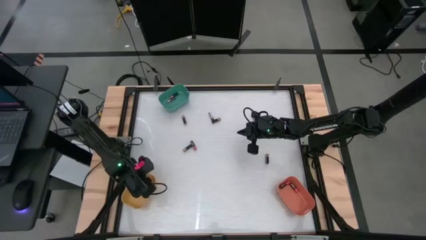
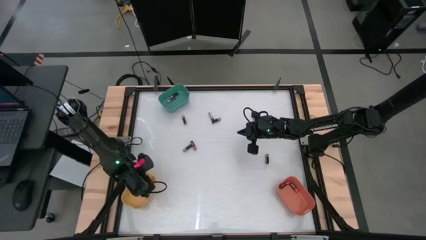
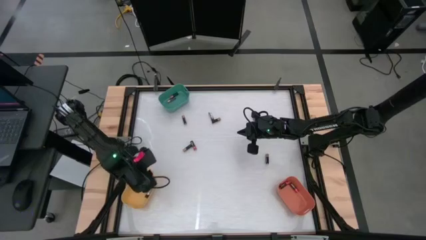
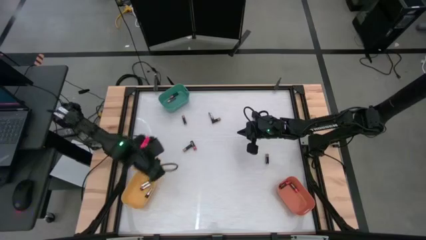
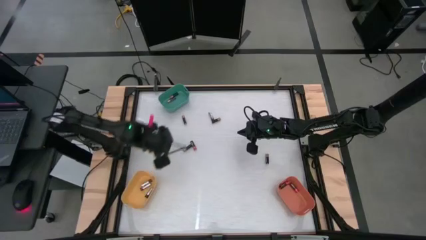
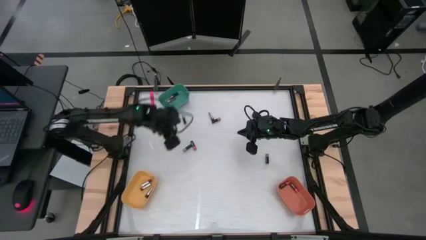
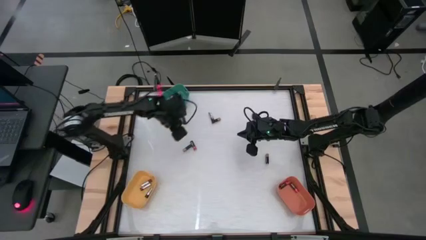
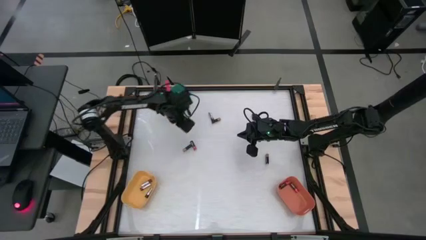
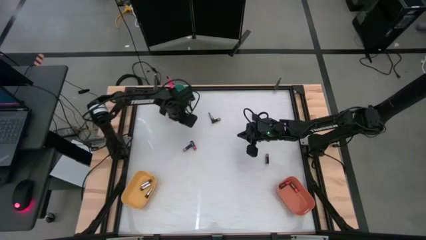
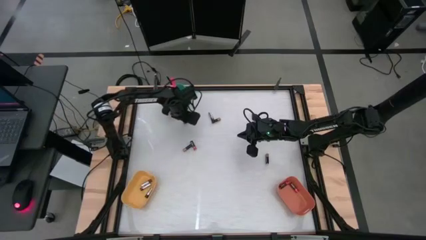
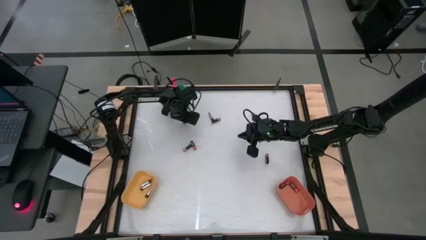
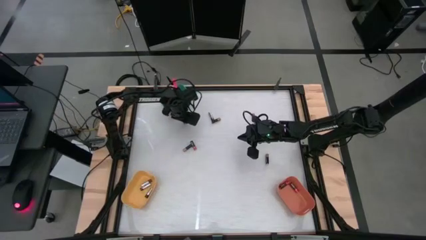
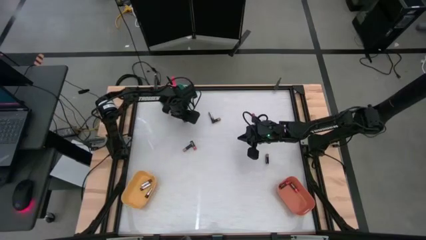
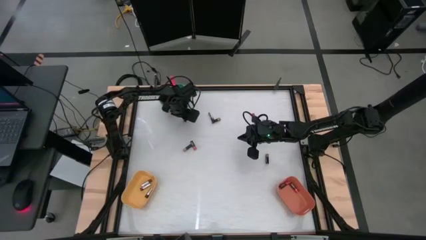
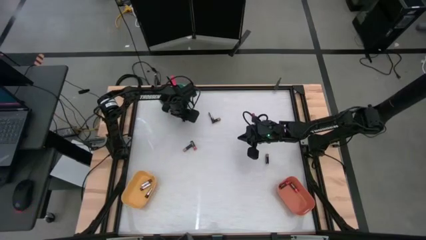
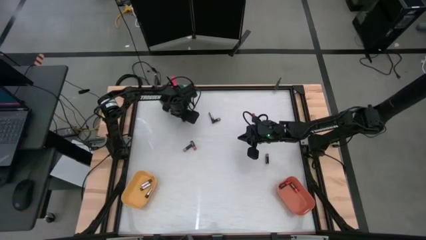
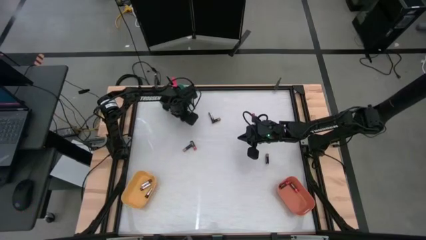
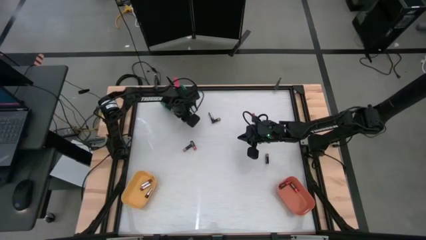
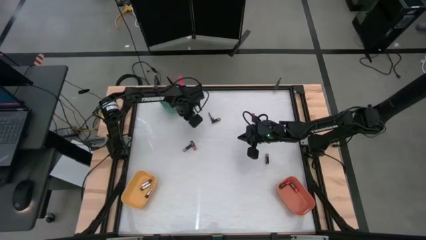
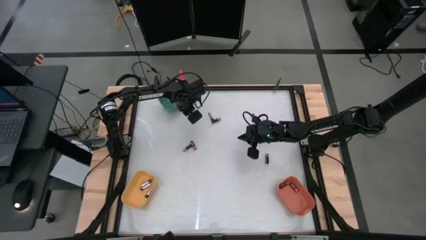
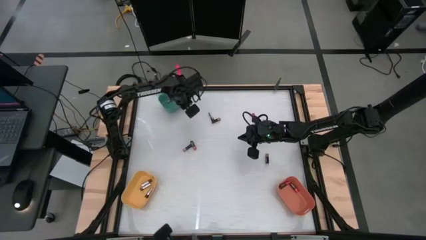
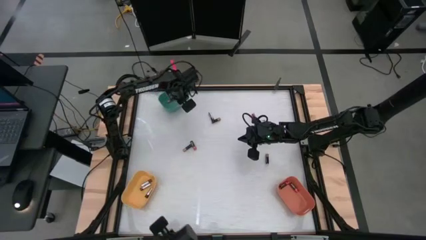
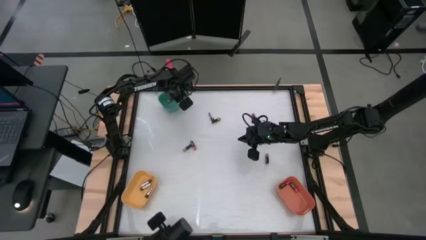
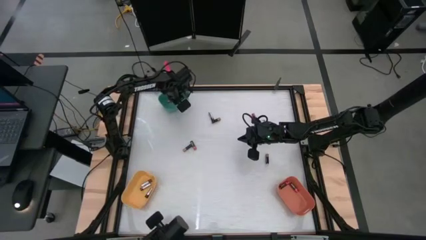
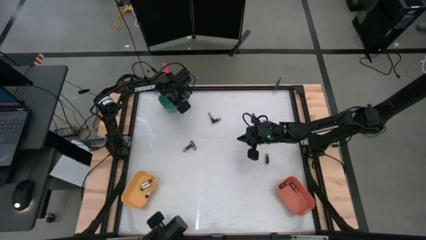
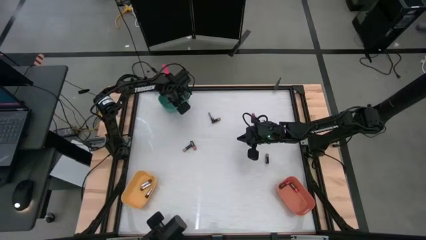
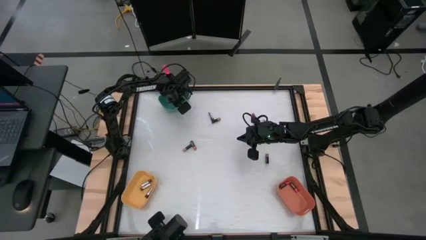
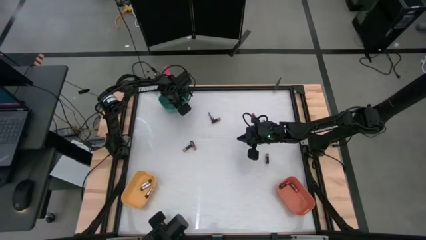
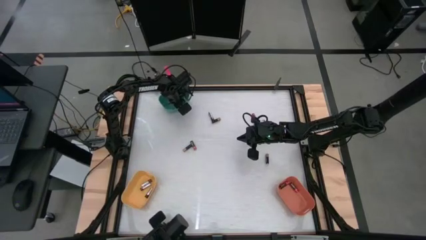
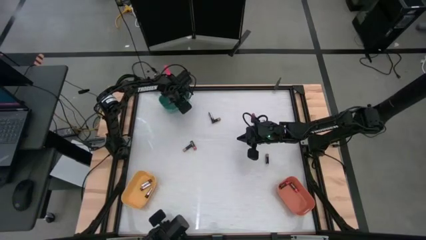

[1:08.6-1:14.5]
Task: Sort batteries
Put the brown battery into the green bin

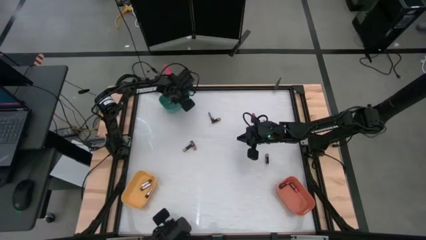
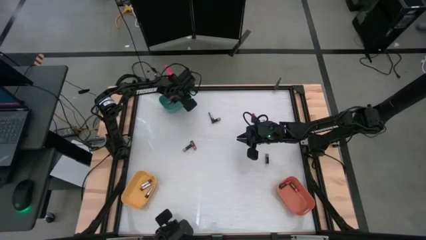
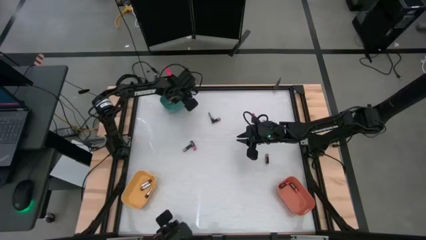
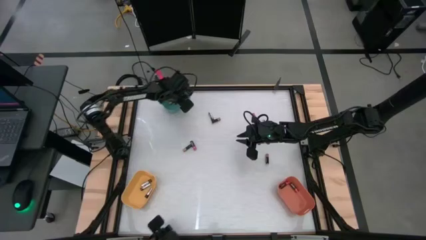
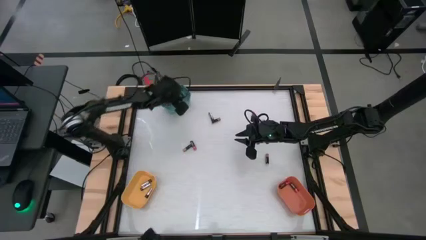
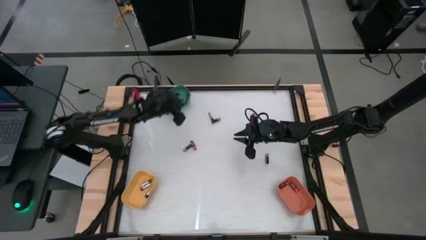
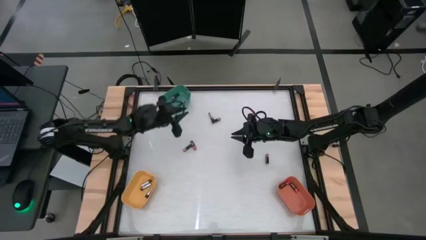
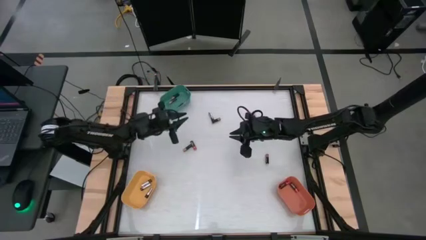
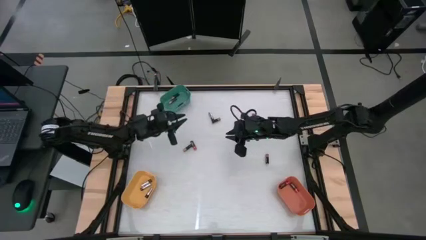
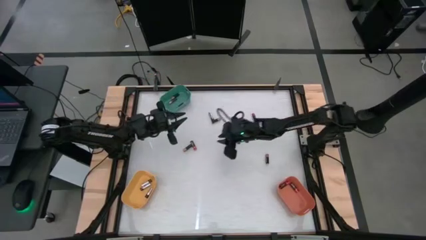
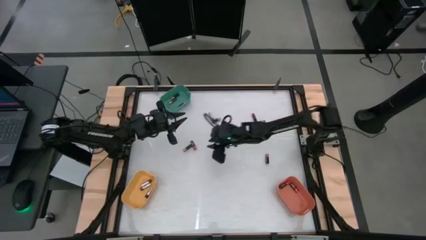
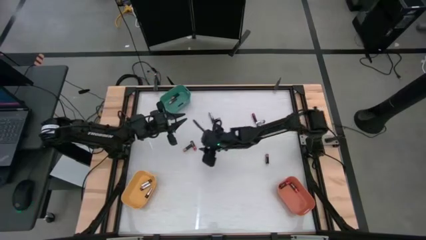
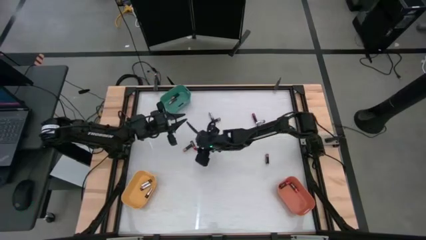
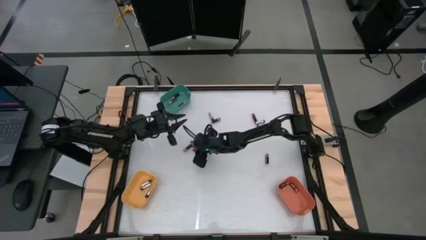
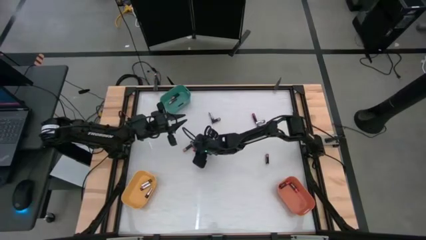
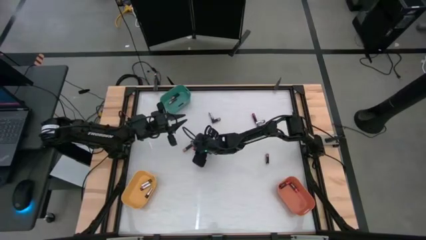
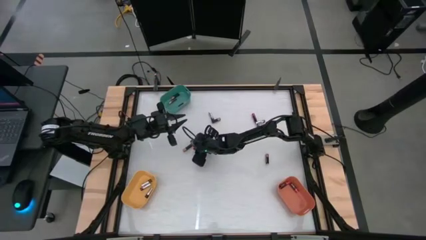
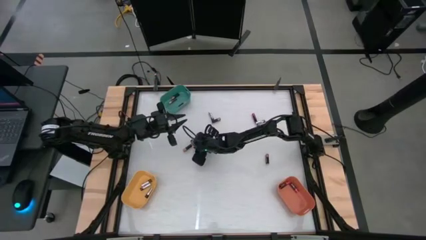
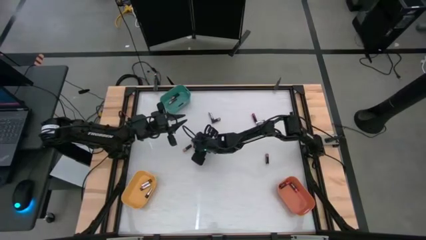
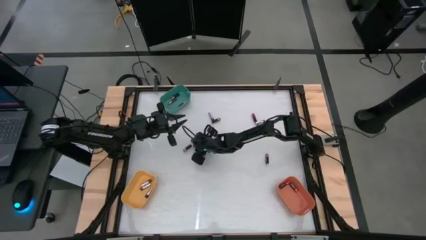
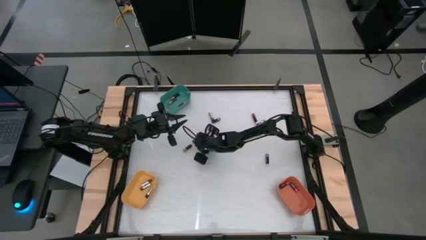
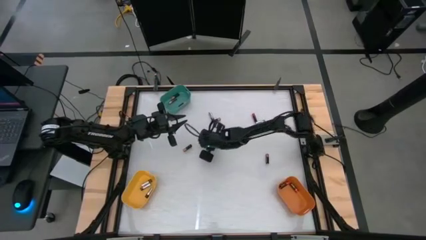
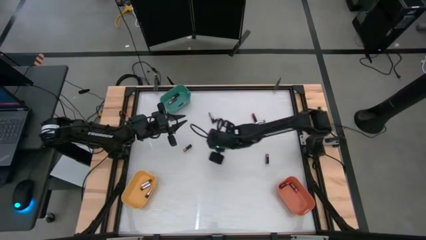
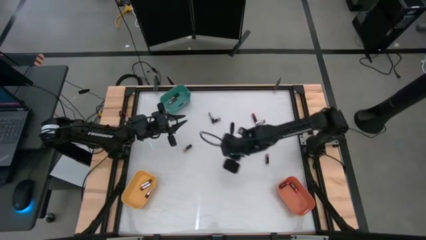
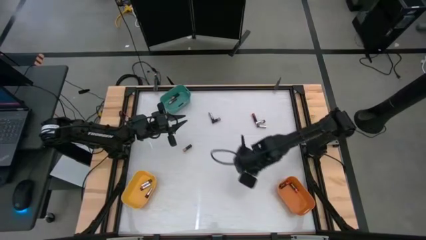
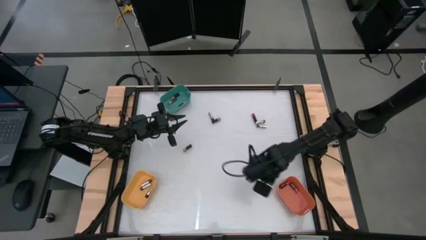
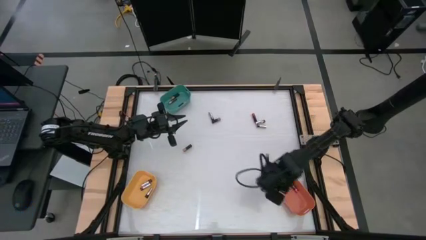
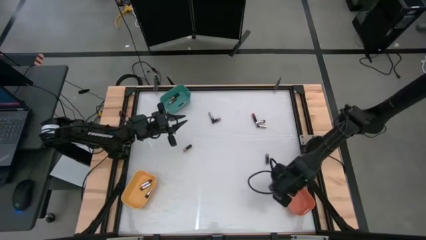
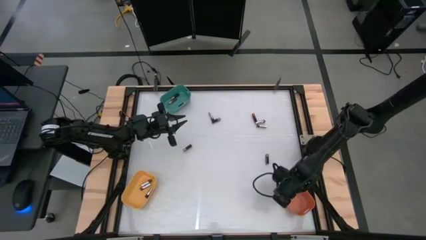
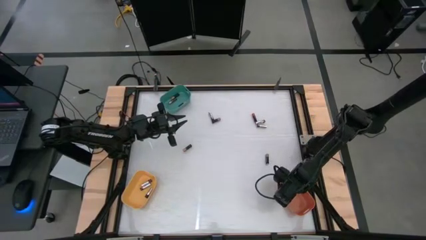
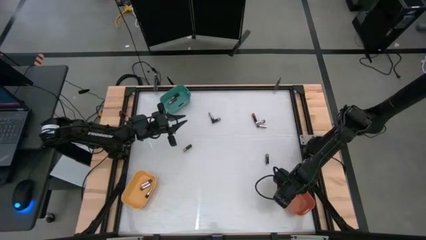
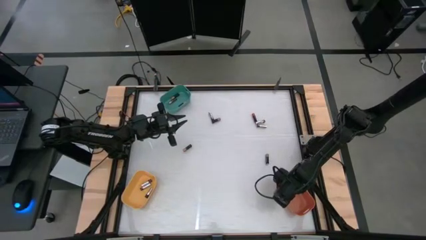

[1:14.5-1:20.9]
Put the red battery into the orange bin
